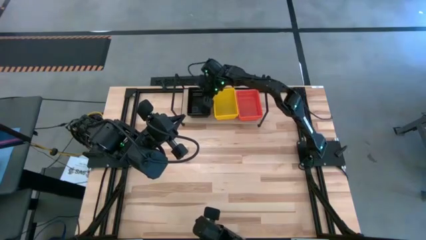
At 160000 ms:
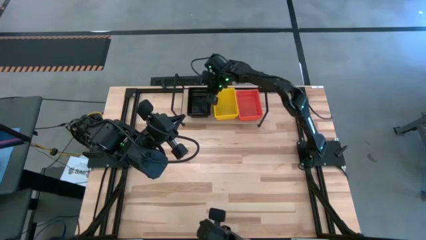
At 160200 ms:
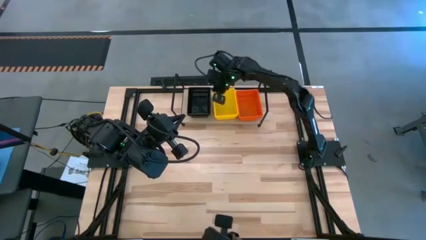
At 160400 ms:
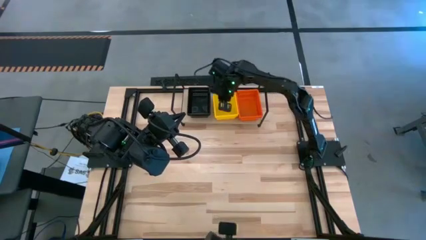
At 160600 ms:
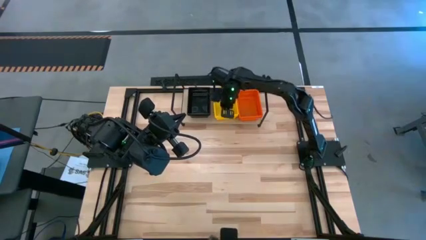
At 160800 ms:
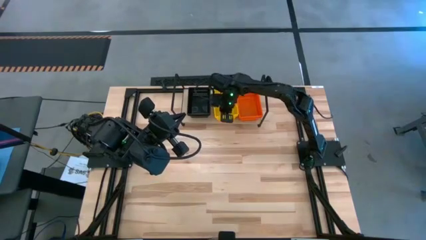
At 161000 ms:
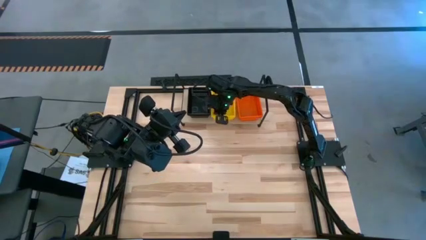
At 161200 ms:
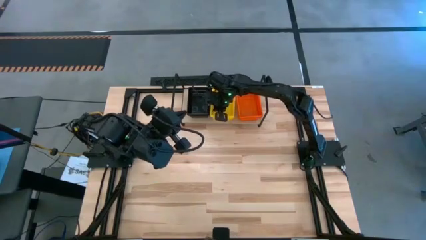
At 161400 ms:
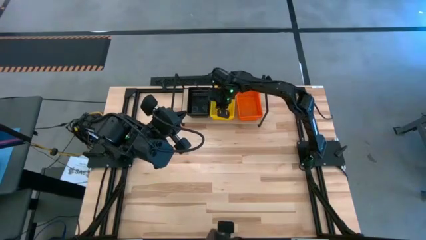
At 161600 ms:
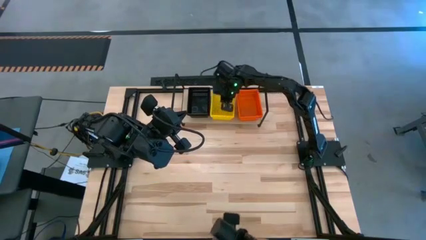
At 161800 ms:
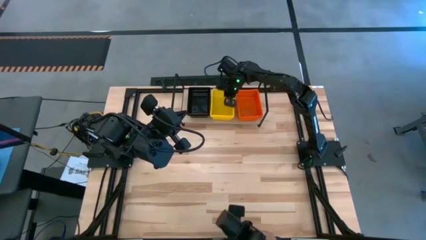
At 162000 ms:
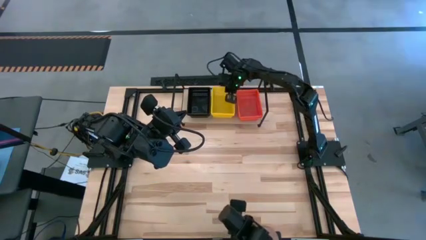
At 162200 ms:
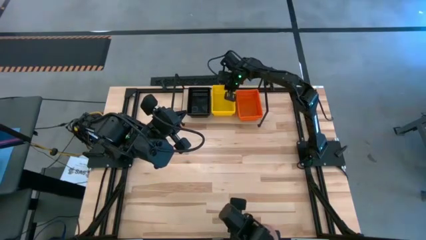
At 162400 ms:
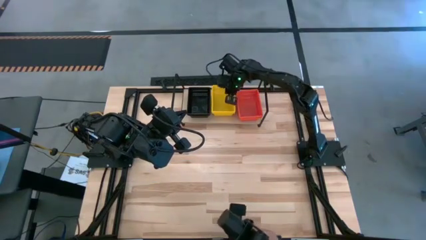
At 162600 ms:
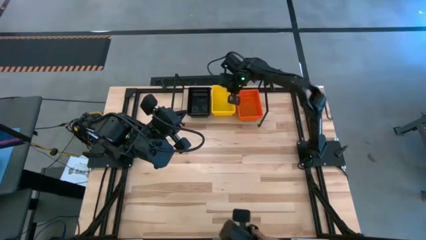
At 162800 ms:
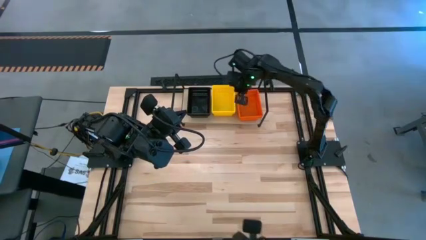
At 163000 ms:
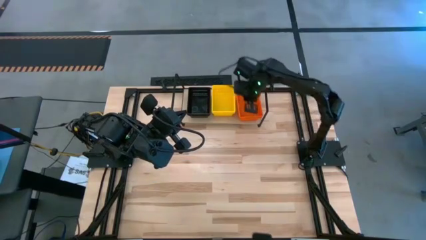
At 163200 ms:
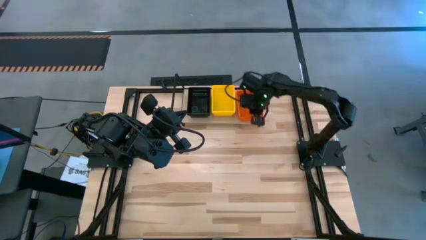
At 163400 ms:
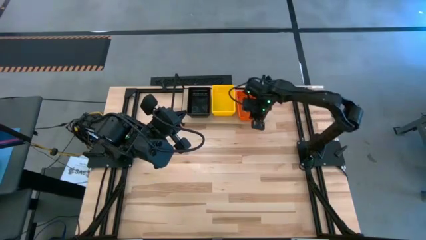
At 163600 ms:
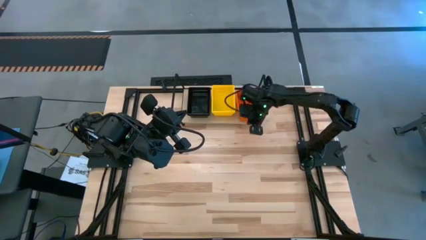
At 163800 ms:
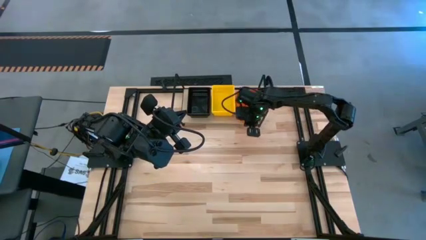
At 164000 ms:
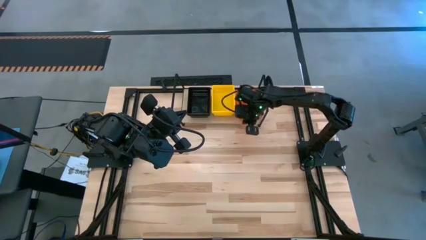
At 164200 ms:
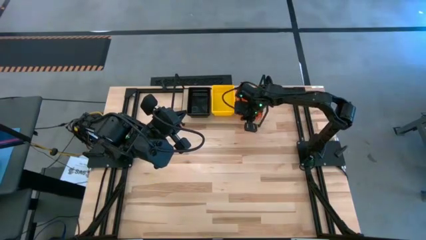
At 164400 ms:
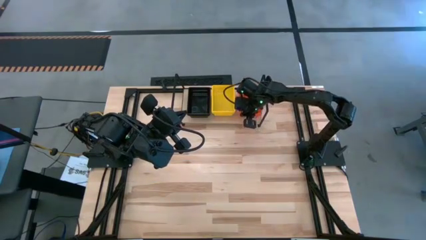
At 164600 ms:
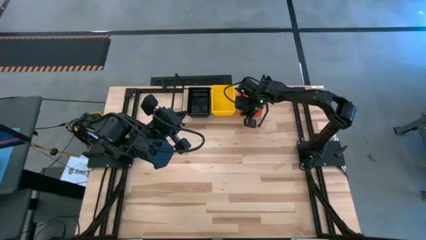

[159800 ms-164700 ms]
Task: Stack baskets on shelf by color
Adjust the bins on the shelf

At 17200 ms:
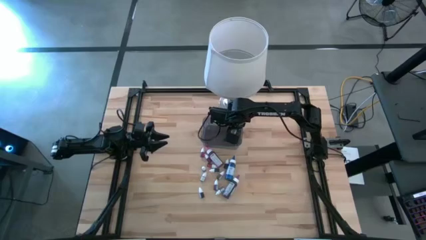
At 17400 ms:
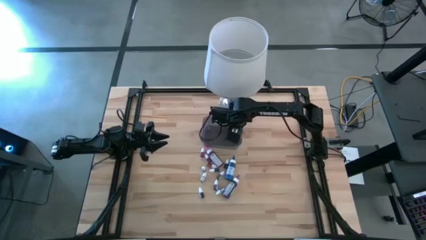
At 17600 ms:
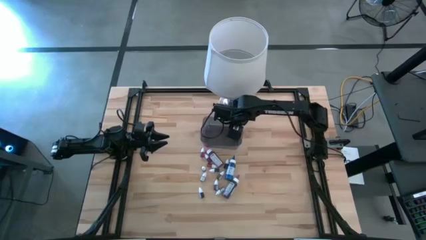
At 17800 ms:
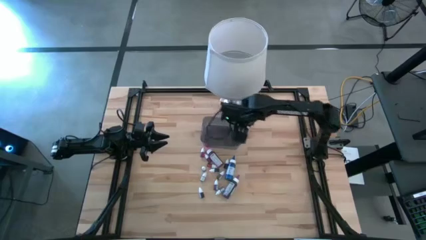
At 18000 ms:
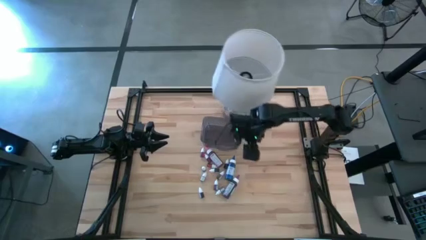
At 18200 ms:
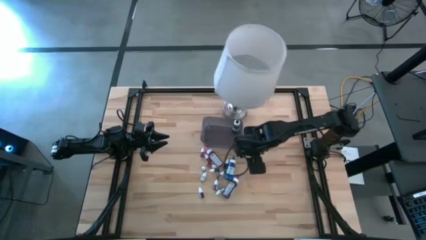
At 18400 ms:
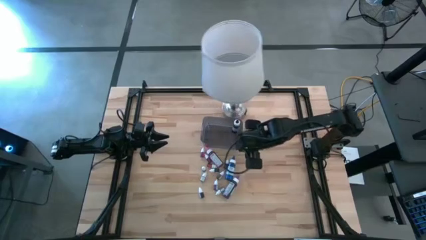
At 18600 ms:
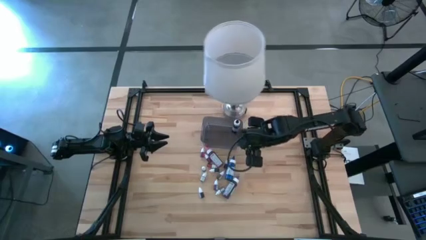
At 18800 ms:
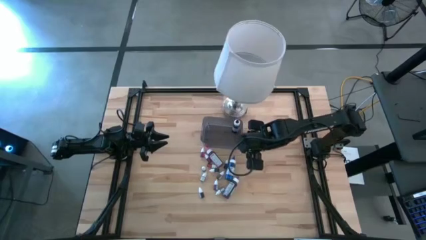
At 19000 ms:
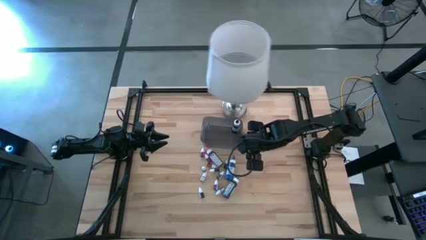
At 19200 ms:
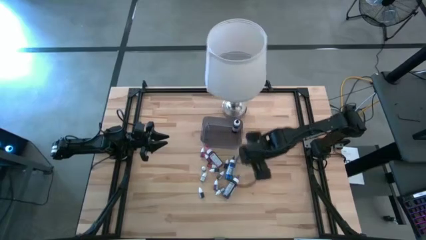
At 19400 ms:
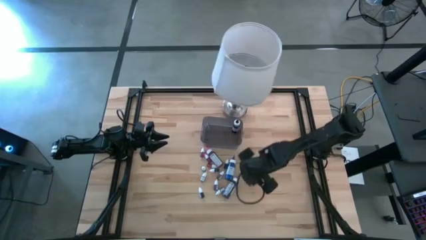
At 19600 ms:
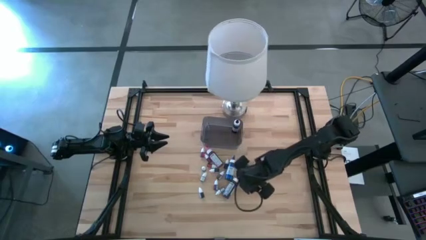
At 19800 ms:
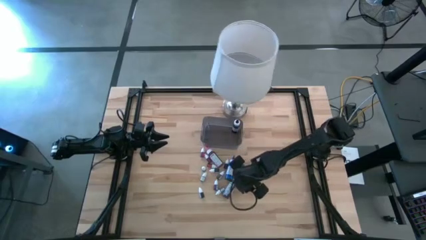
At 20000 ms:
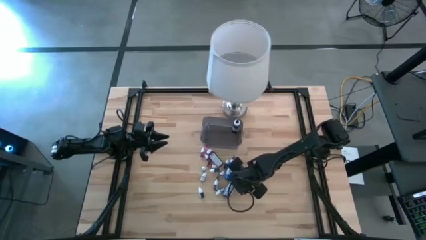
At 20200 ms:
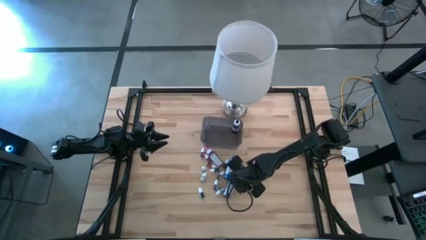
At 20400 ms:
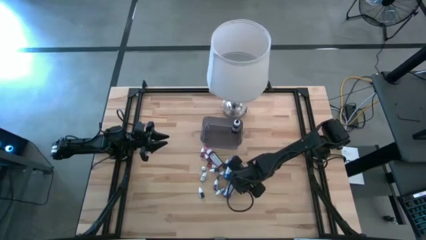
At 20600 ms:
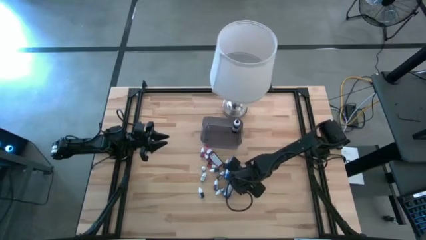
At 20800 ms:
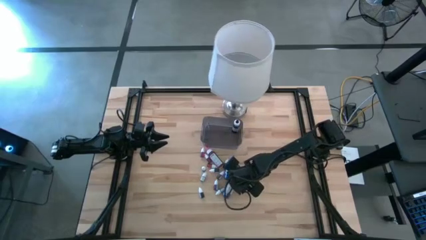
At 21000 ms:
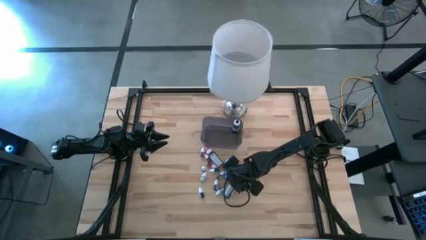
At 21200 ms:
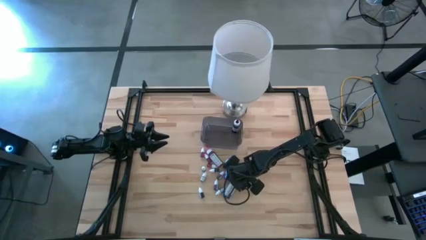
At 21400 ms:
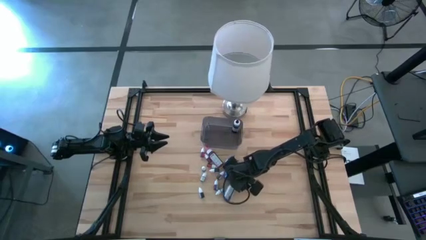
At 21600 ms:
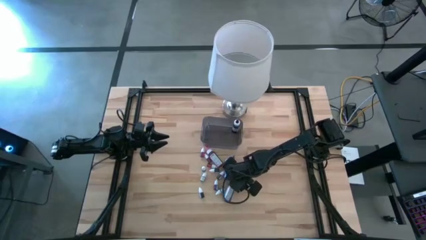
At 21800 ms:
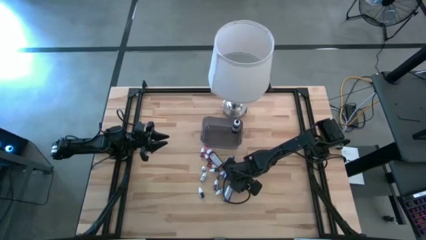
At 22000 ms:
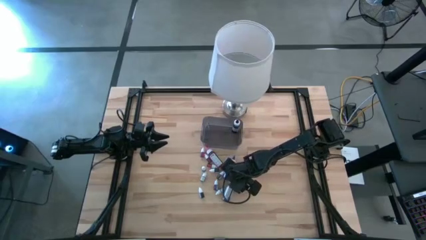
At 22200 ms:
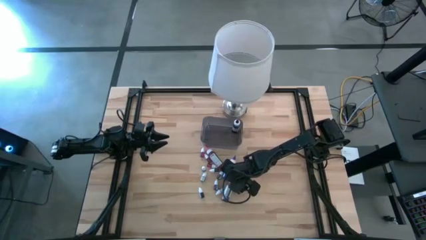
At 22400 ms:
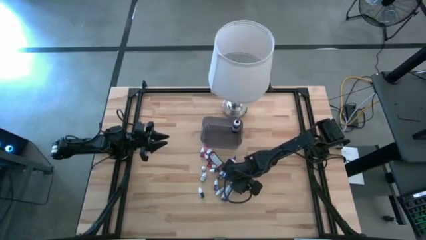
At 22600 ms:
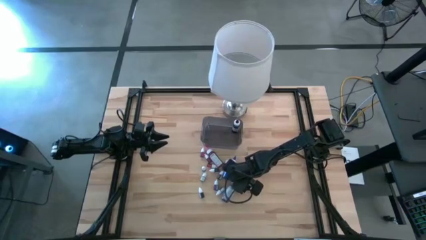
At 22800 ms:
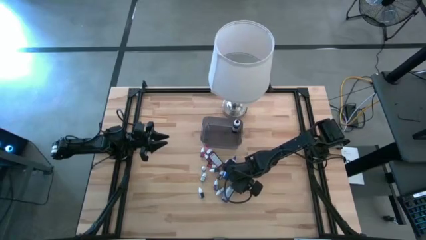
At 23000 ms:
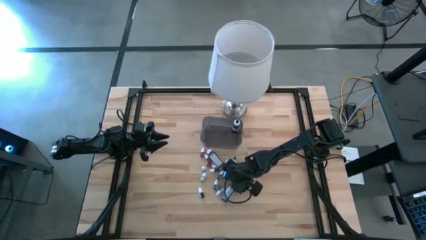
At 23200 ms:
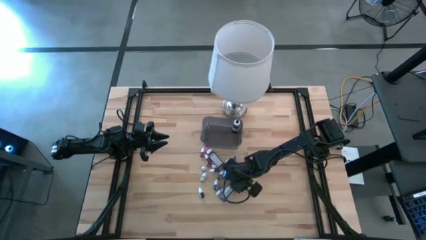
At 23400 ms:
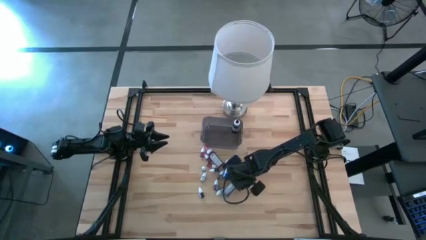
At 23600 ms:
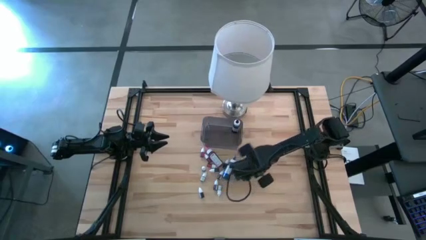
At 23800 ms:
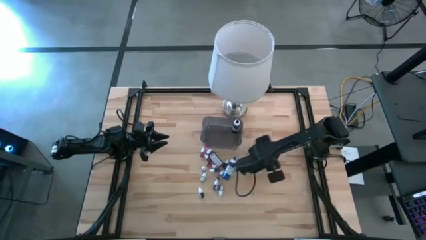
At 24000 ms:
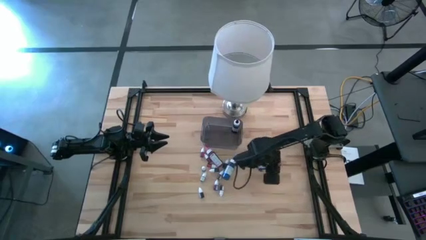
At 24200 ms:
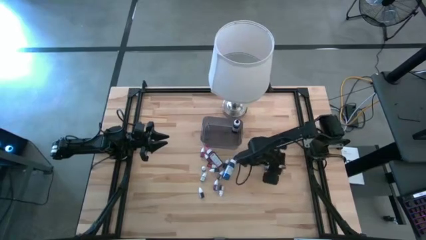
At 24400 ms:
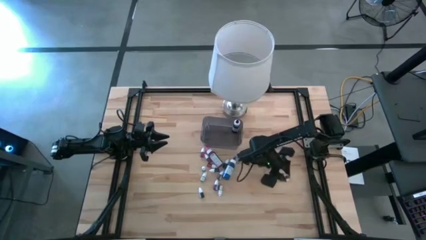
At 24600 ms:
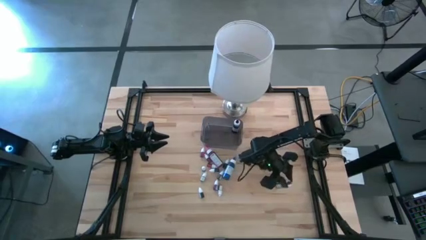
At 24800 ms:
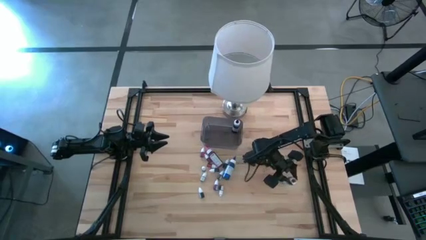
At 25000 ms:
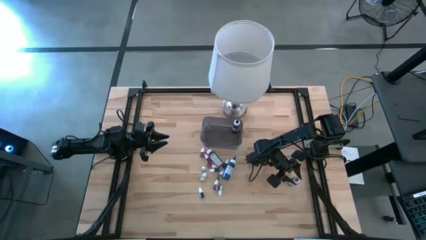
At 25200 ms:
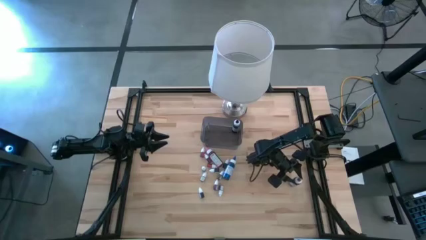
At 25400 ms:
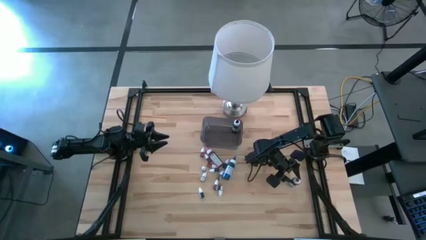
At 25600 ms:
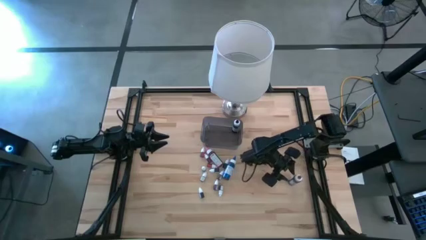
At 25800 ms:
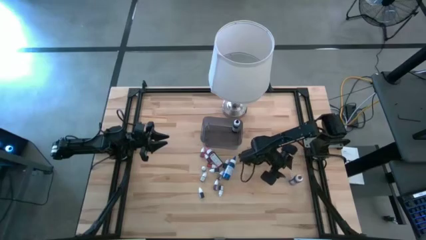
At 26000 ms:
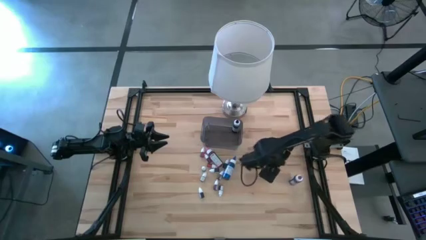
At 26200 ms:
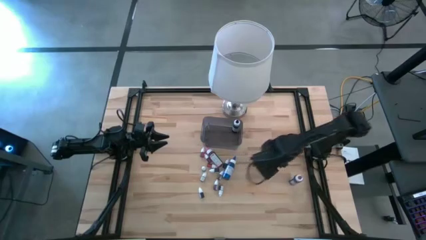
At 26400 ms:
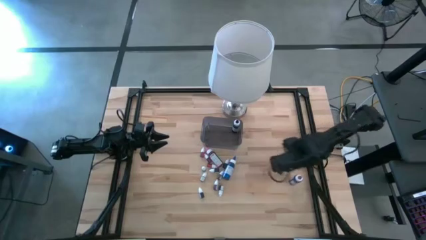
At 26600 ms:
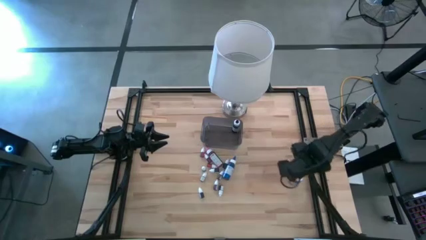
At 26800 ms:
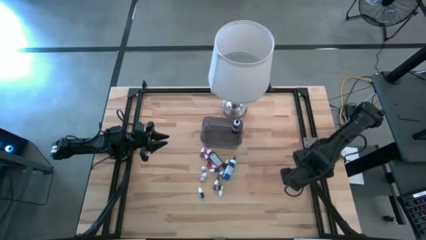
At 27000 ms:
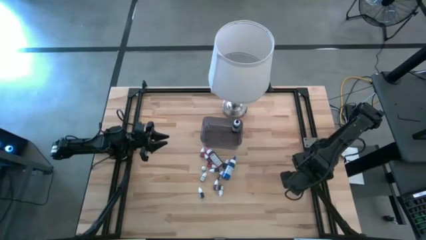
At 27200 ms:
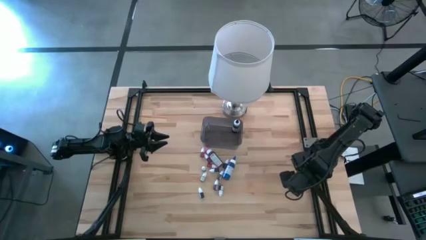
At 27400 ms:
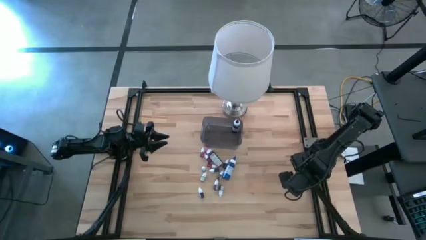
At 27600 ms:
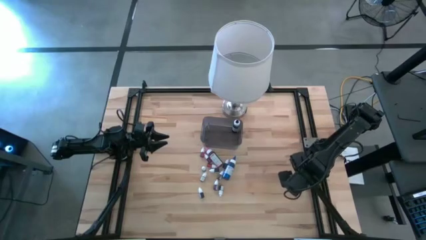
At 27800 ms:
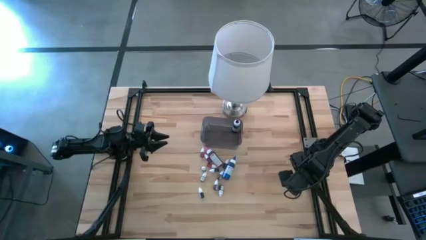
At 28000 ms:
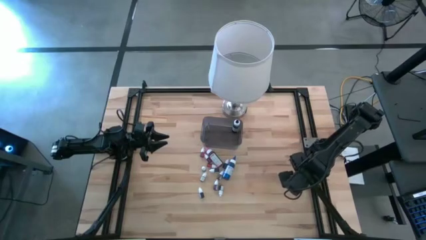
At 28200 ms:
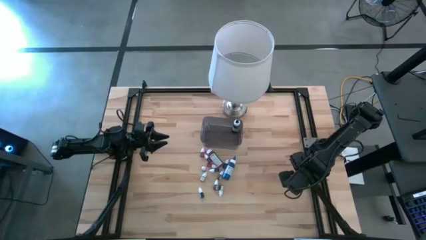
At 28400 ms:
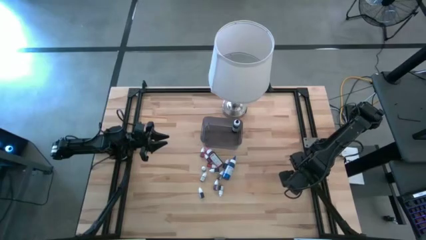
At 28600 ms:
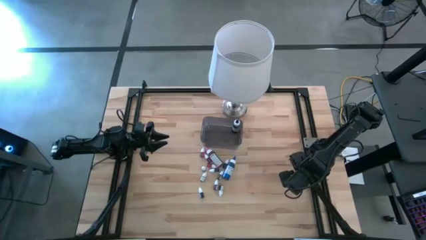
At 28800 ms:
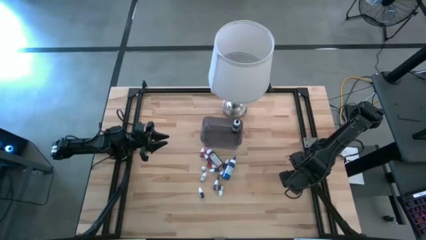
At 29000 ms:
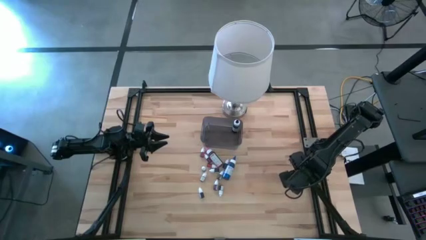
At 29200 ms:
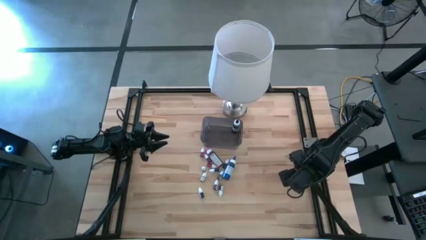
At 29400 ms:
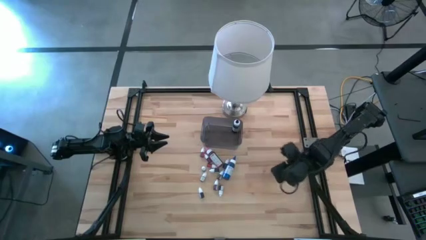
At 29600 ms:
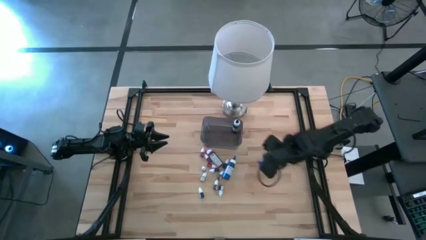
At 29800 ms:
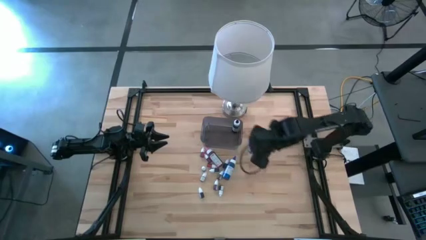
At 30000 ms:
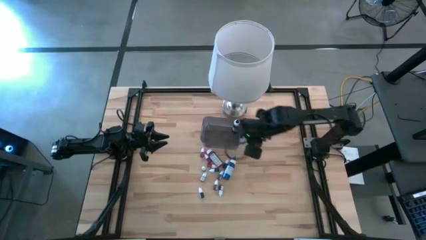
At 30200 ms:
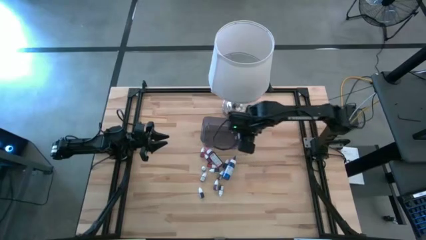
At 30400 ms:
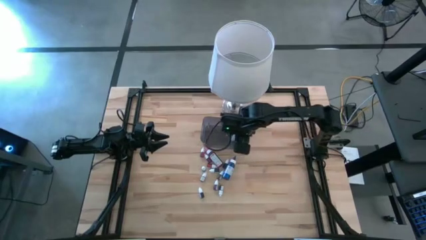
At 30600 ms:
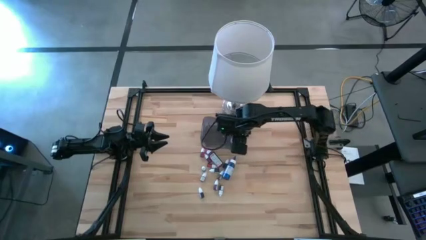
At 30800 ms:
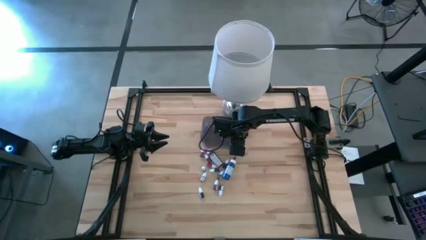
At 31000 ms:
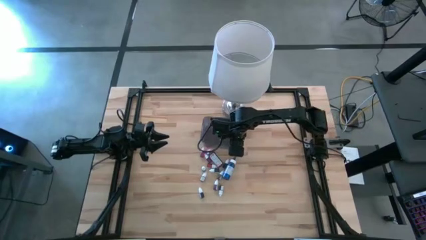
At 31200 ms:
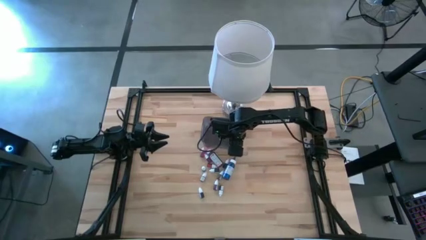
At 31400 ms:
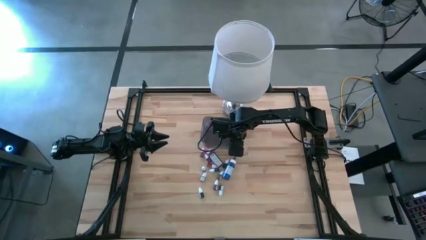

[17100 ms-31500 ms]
Task: Pick & Place food coloring
Put the big purple food coloring bottle into the black bin
